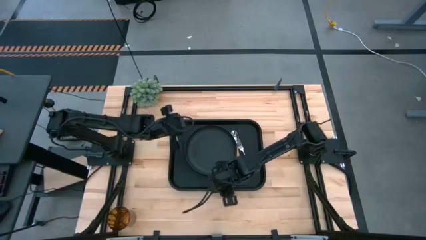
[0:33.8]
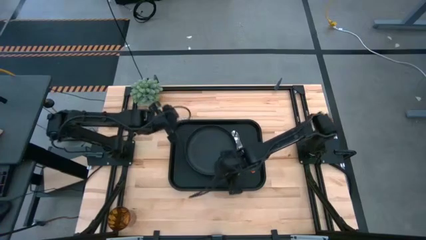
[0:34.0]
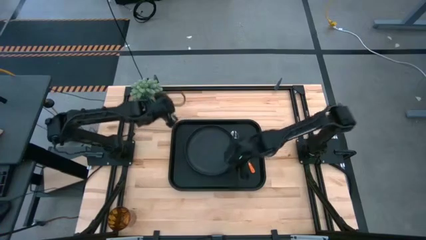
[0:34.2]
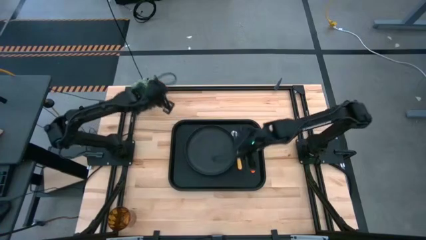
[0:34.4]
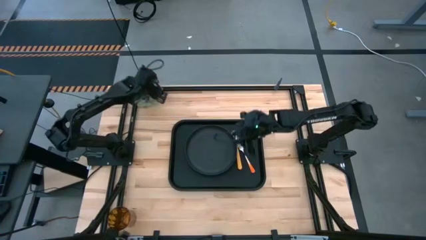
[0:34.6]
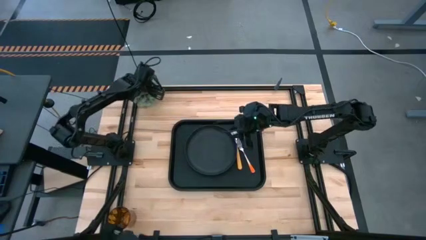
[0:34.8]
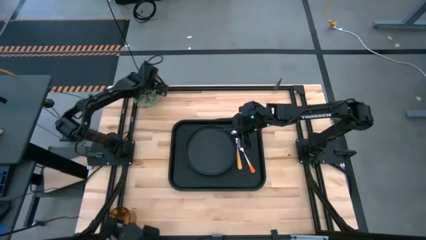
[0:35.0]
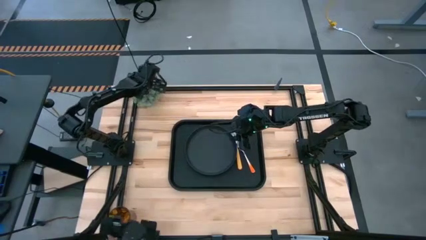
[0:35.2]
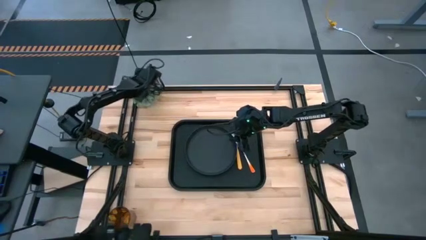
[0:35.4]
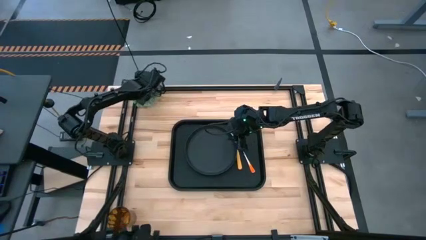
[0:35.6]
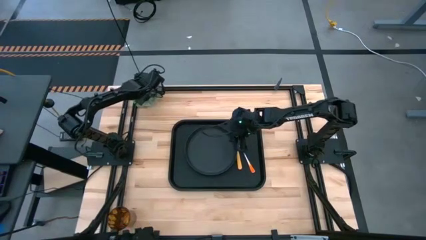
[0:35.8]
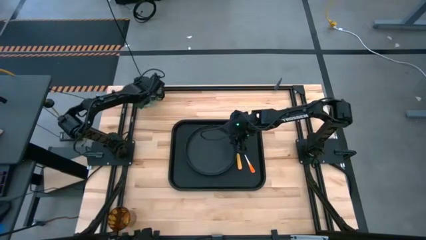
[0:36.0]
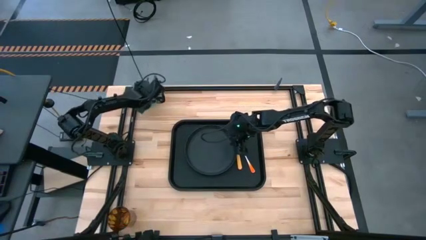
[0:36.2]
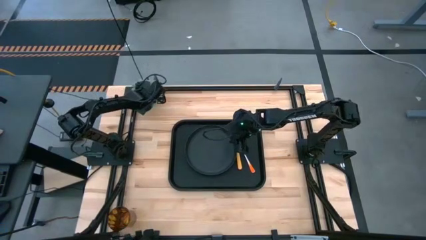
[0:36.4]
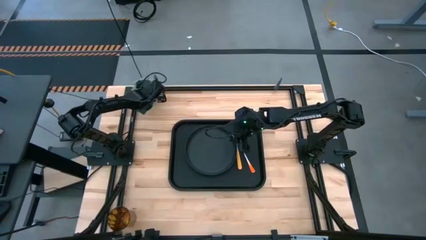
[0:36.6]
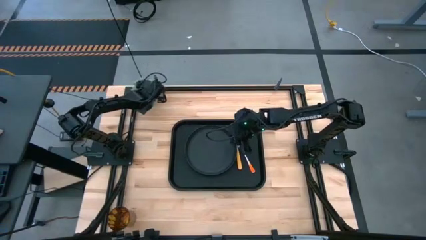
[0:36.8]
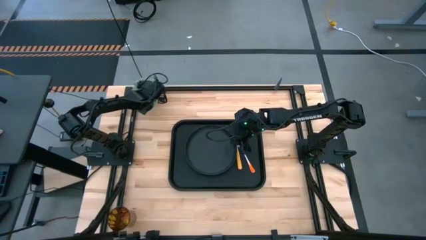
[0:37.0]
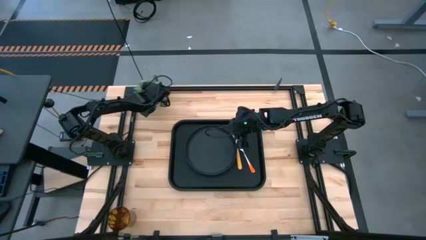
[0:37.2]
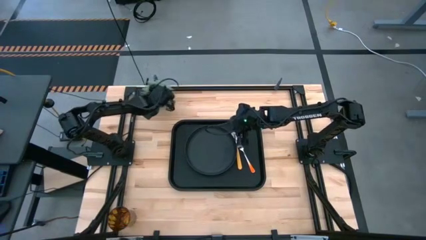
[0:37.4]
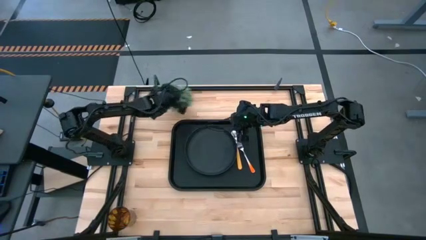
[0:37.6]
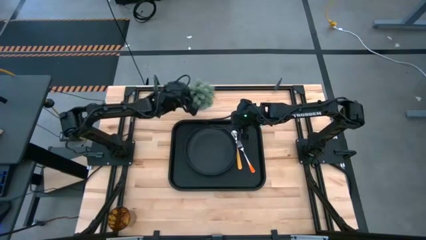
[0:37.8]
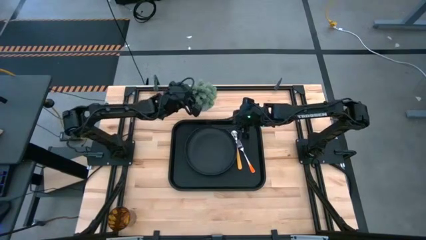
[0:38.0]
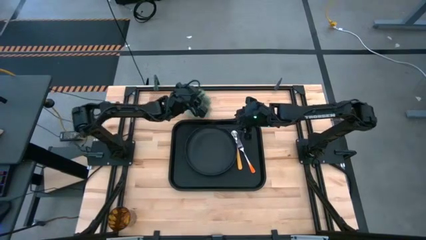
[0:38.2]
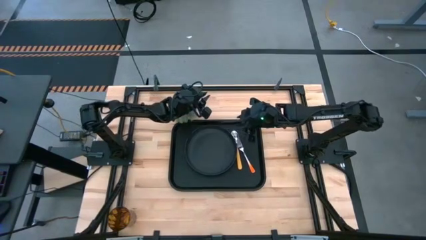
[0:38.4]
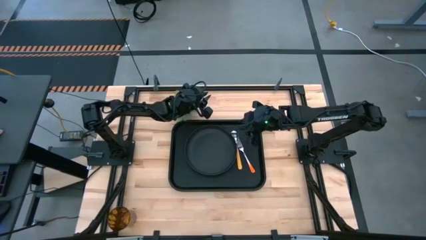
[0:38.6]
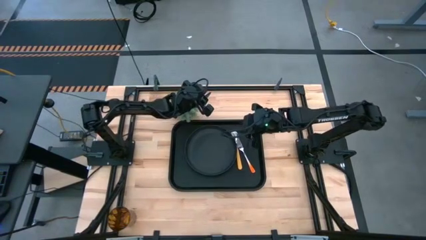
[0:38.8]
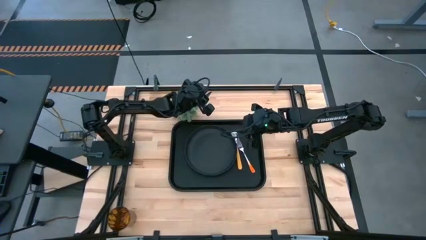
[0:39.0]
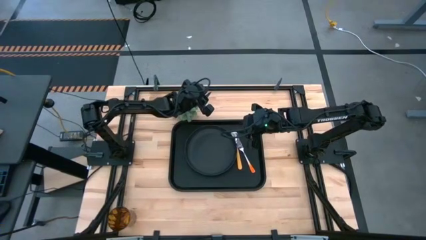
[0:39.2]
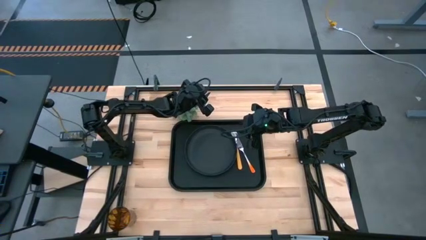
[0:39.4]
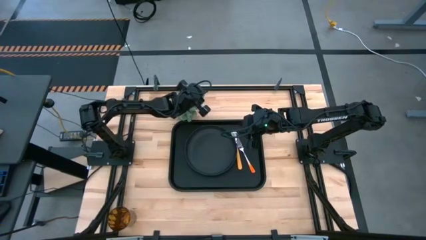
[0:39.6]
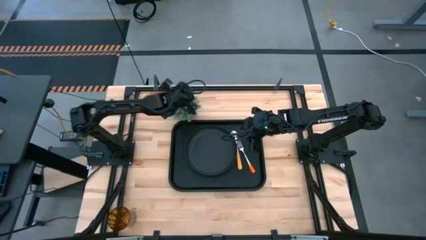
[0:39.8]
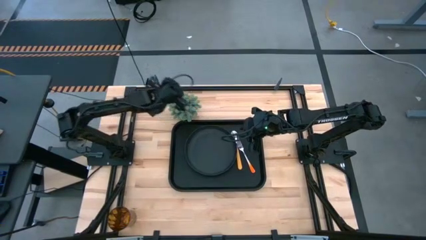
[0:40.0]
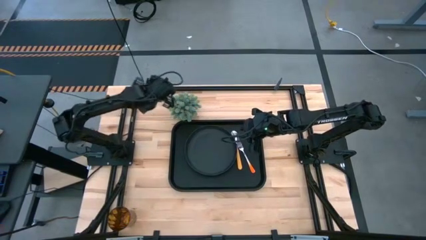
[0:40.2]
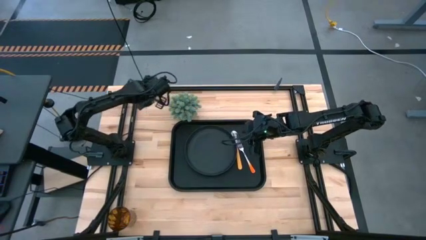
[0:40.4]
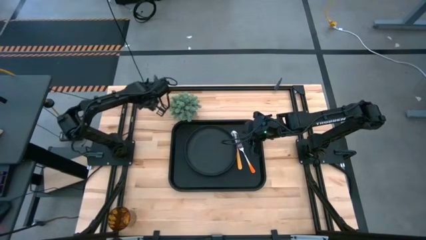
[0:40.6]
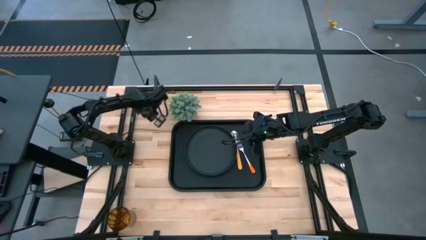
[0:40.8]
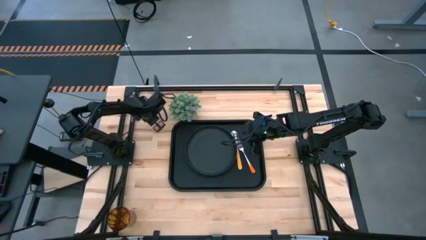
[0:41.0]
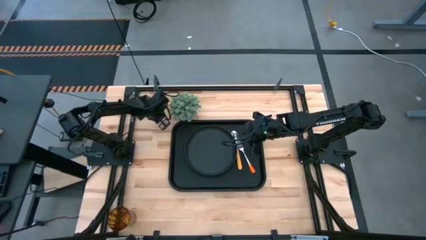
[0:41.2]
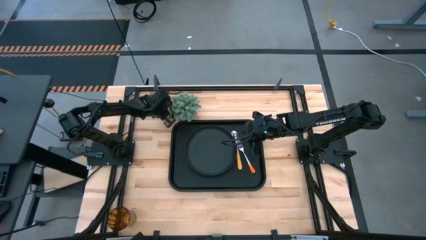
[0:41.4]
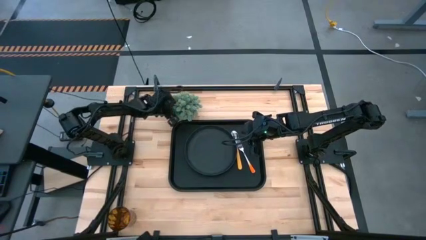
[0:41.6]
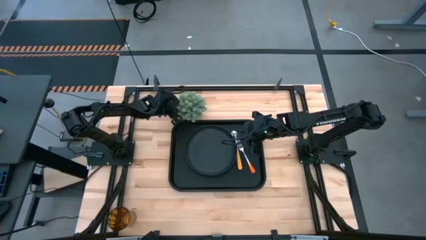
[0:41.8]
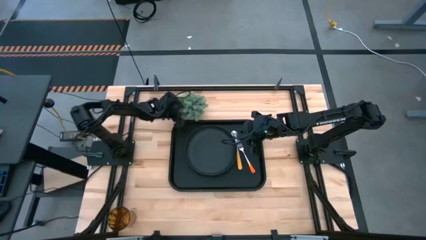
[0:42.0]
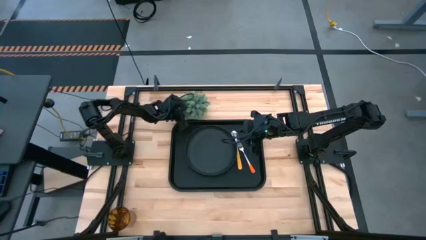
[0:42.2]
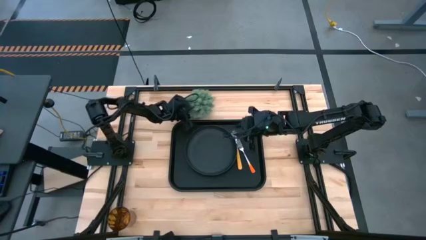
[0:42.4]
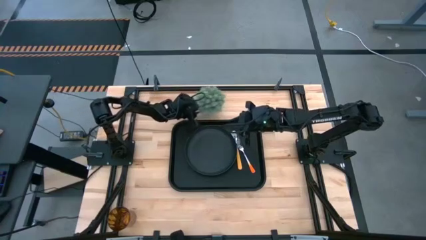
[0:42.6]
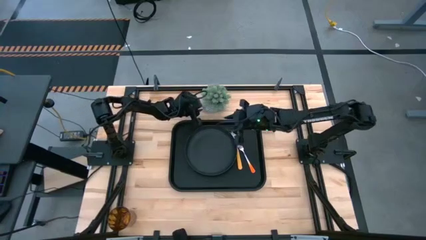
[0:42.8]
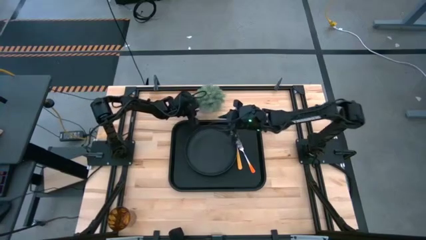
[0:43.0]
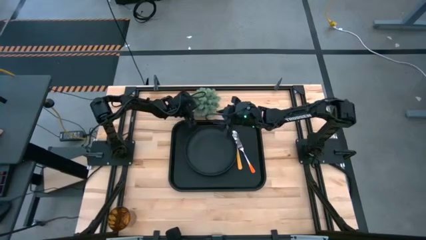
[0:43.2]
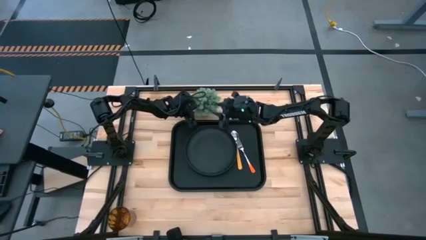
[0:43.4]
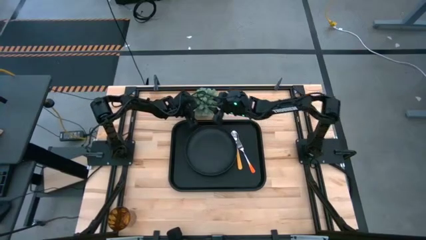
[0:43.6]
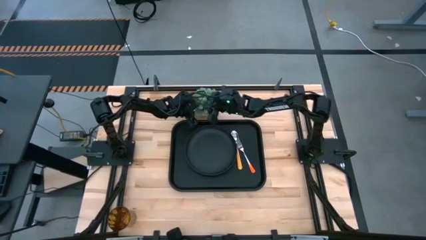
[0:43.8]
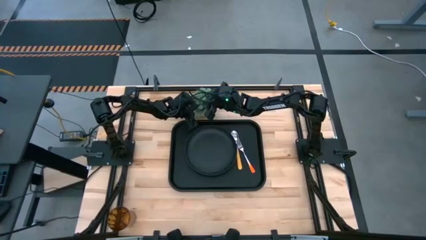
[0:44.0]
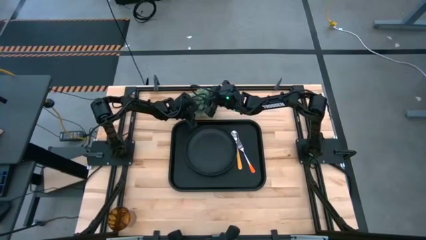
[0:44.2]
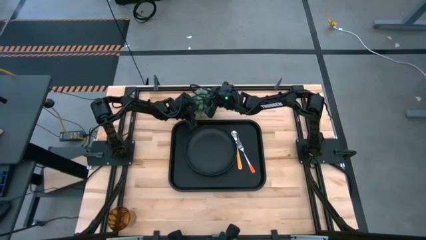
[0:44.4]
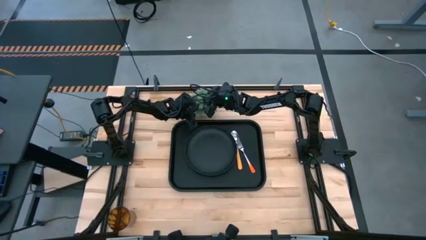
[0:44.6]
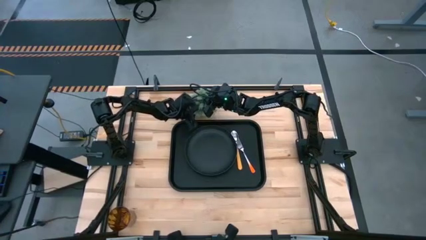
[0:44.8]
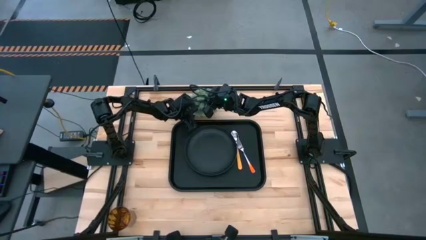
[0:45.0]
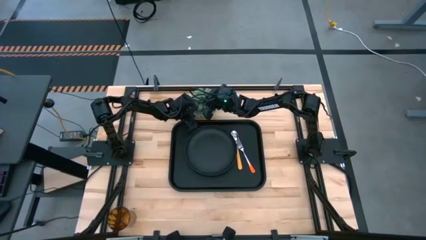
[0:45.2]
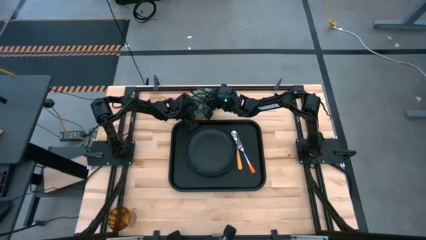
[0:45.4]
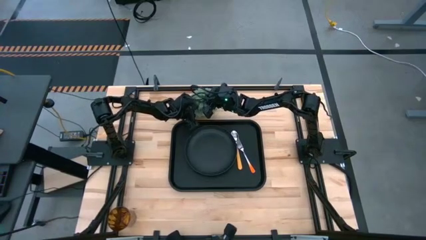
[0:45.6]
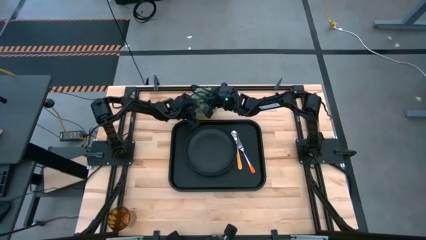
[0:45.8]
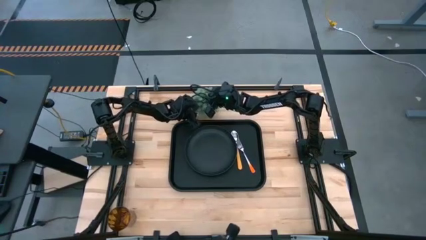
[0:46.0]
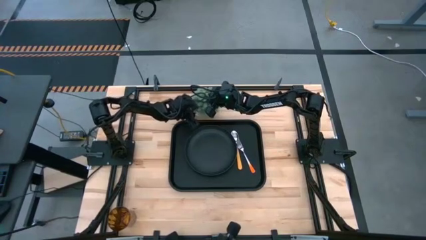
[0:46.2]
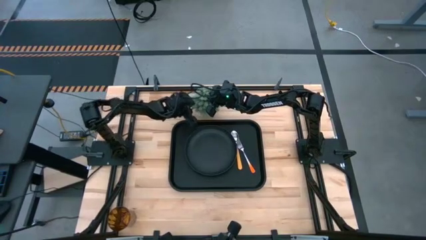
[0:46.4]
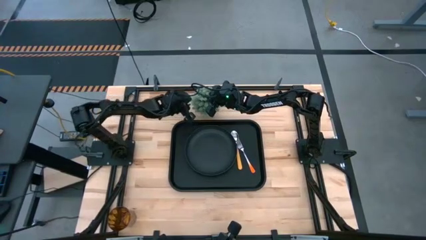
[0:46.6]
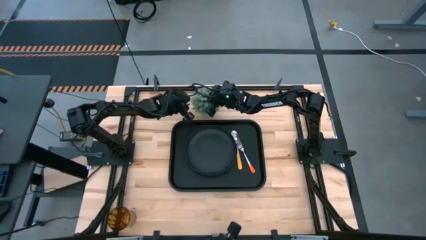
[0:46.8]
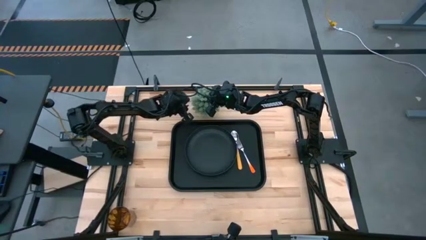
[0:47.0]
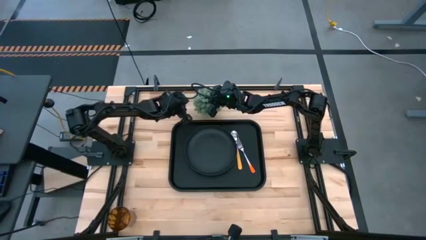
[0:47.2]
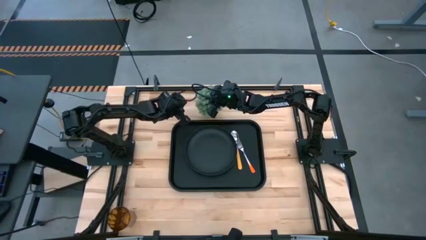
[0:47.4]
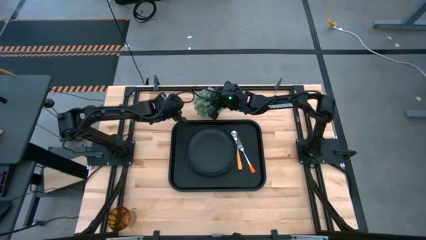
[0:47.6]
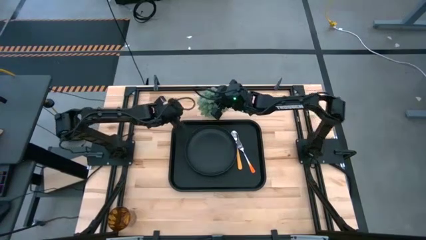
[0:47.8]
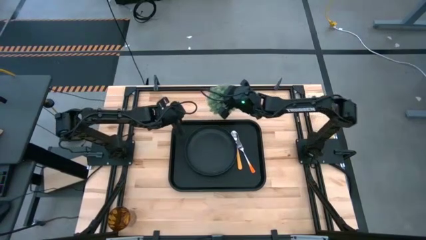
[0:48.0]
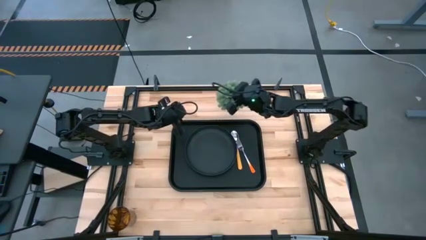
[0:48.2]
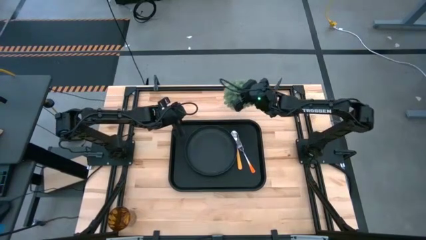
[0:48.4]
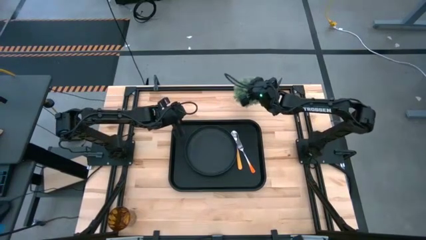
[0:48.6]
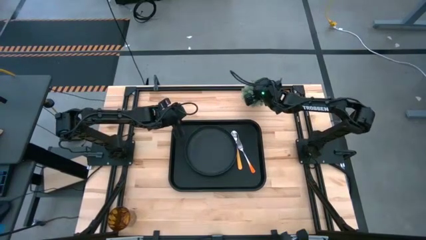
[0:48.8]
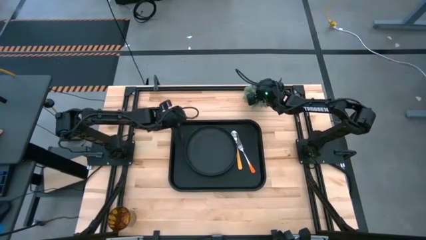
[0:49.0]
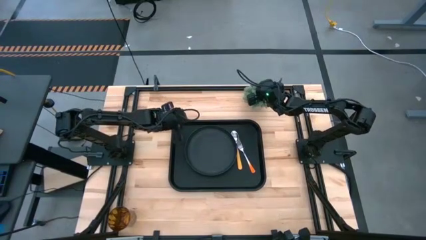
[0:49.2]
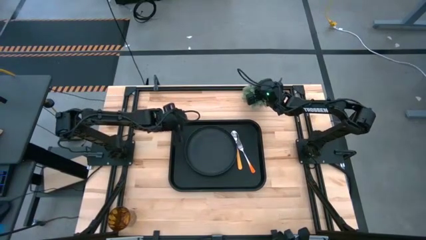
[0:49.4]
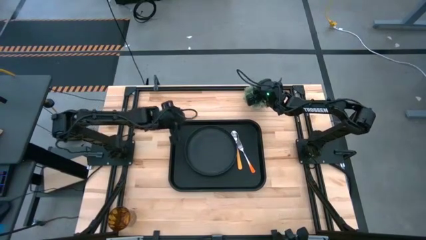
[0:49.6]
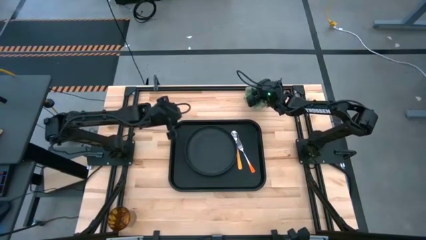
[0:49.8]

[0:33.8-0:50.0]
Task: Pick and place plate/cup/fork/spoon on tray
Move the gray vase plant to the top right of the table

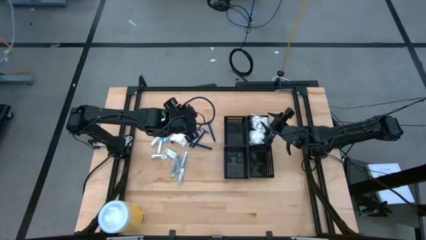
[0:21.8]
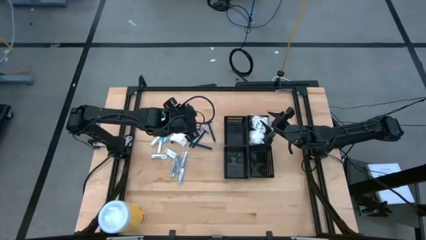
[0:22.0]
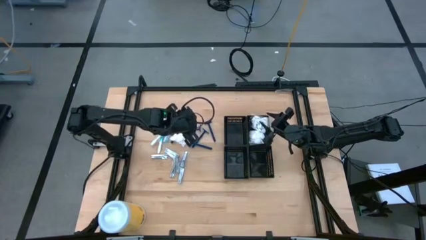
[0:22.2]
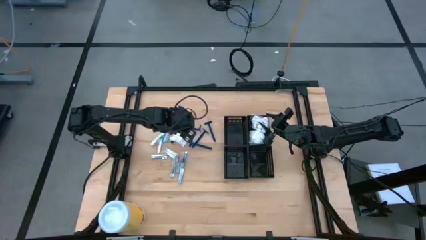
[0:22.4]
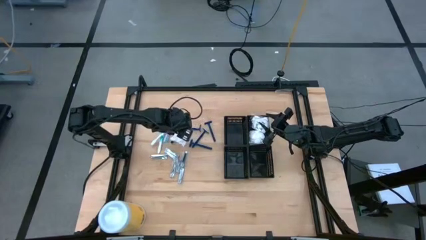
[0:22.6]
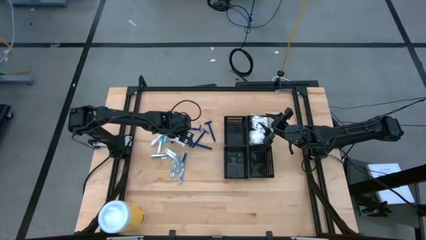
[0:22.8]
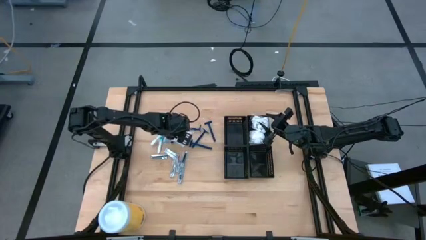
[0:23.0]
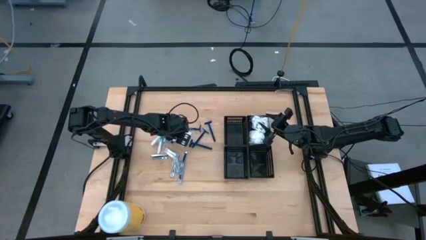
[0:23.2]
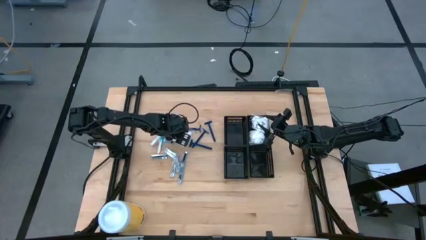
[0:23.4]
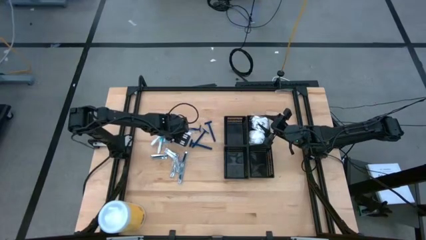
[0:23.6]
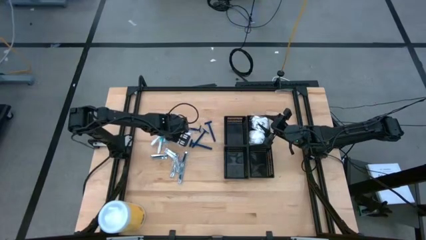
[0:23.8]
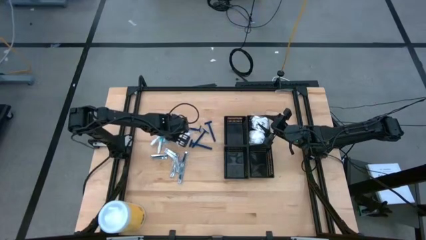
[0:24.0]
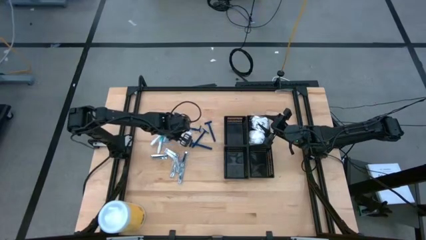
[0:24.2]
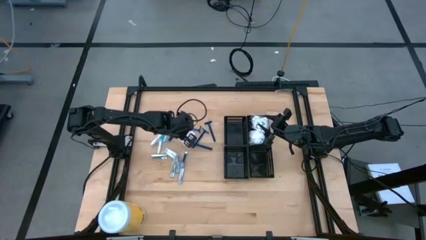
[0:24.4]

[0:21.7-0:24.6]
Task: Pick & Place Travel size toiletries
Put the cotton pack into the top right black basket
